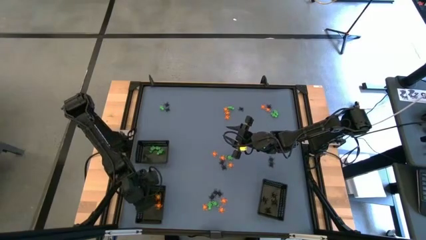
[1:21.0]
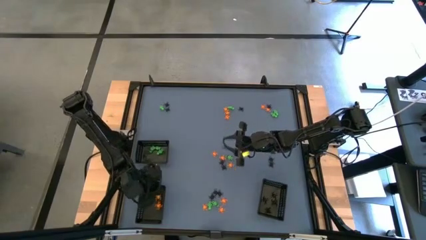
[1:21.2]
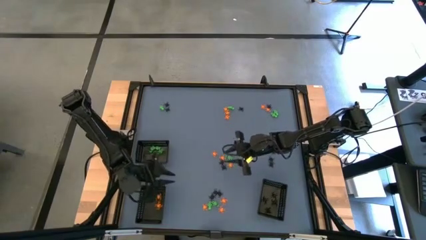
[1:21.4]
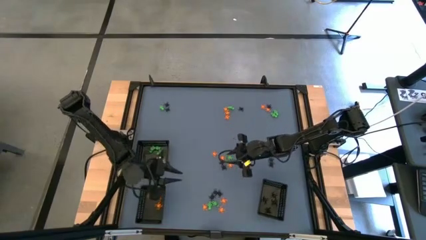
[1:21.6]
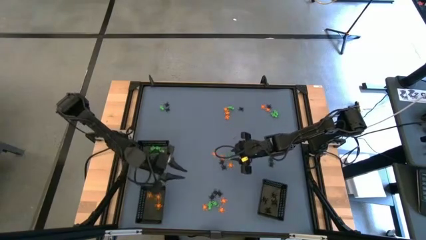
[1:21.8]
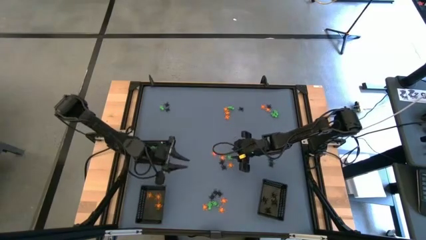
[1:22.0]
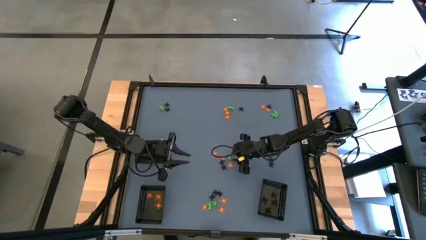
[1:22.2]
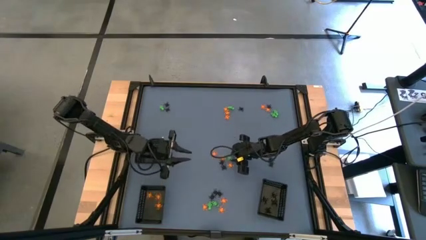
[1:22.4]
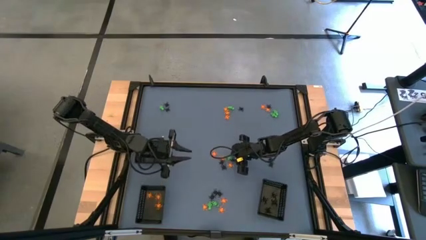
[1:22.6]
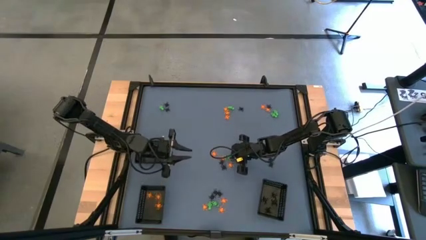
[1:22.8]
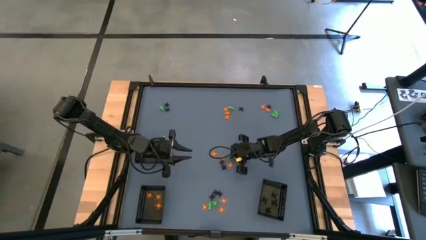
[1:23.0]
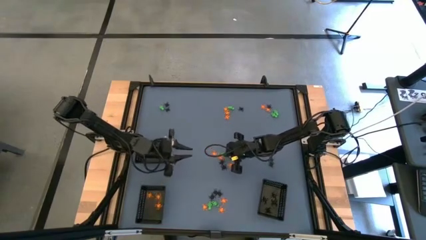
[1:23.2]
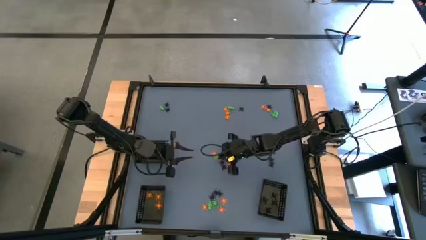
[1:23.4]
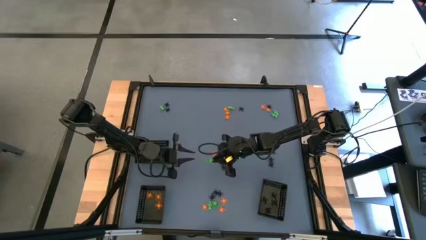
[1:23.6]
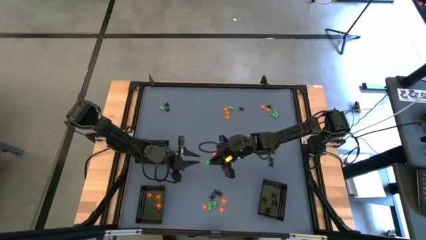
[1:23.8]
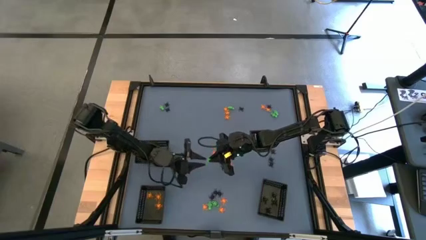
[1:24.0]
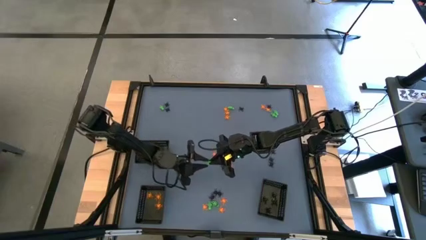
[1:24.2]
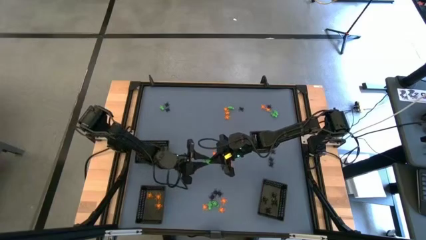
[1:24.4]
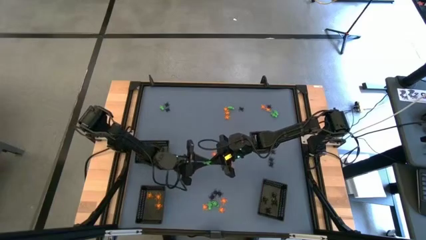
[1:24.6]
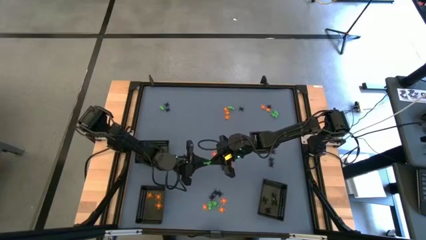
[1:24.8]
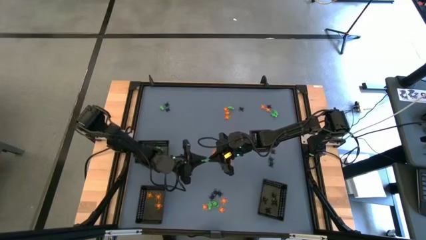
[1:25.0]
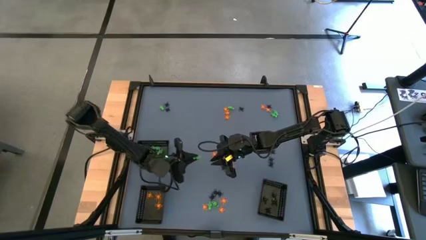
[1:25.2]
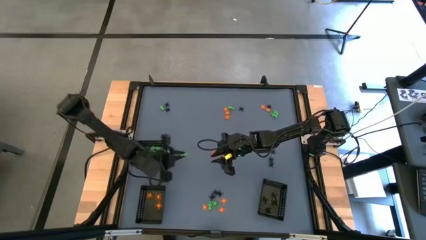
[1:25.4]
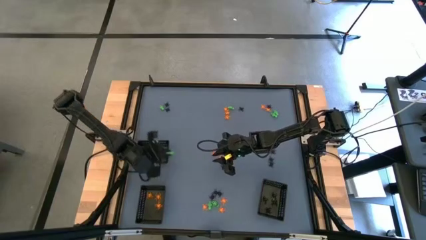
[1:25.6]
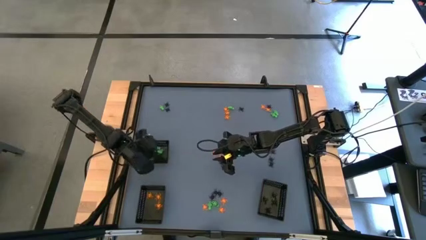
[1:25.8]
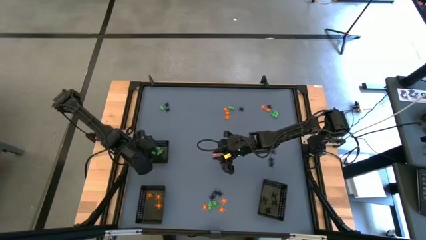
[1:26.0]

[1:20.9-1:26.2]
Task: Sort Halloween decoration
Put the green skeleton toy into the top black bin

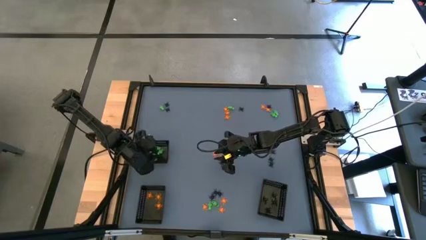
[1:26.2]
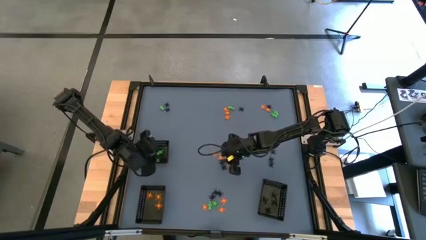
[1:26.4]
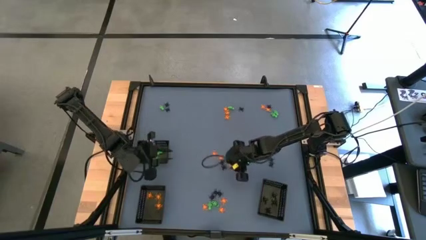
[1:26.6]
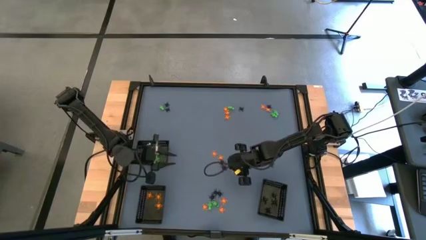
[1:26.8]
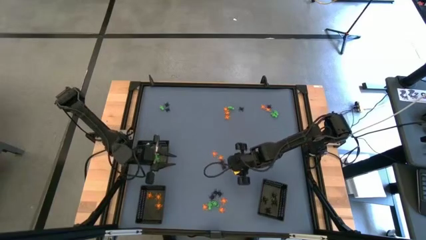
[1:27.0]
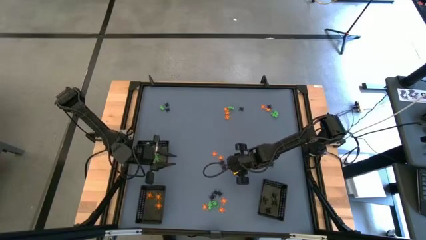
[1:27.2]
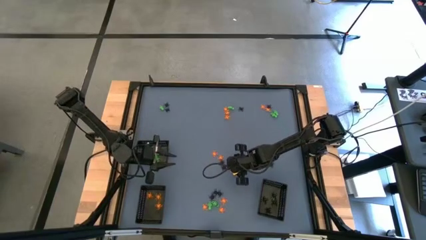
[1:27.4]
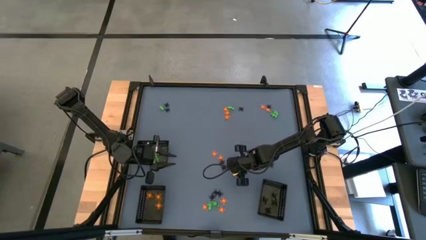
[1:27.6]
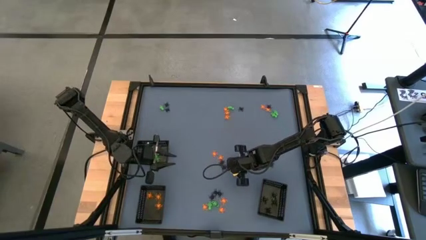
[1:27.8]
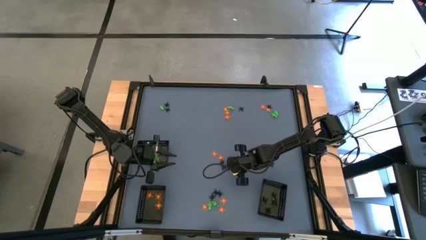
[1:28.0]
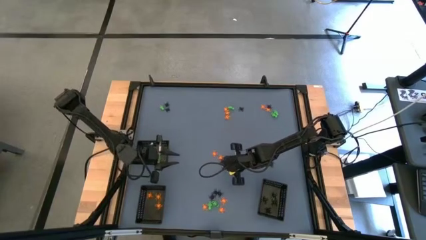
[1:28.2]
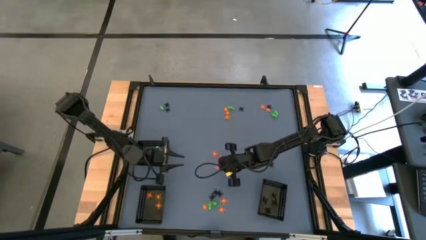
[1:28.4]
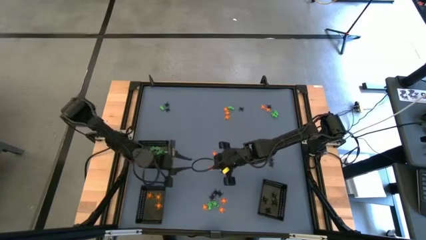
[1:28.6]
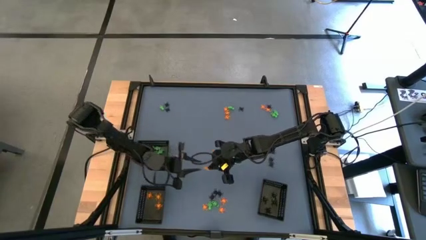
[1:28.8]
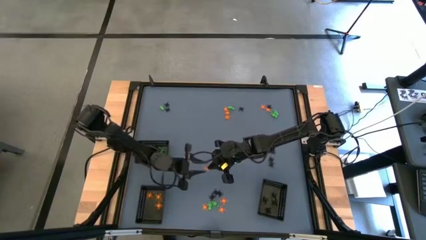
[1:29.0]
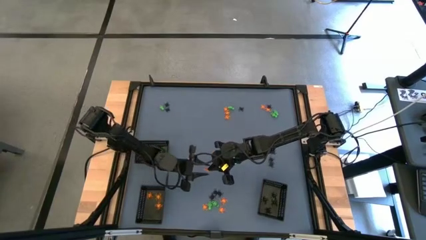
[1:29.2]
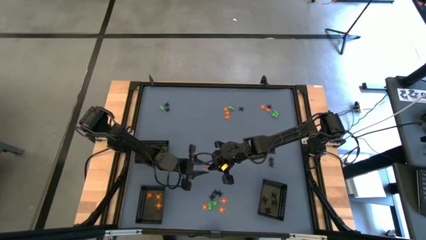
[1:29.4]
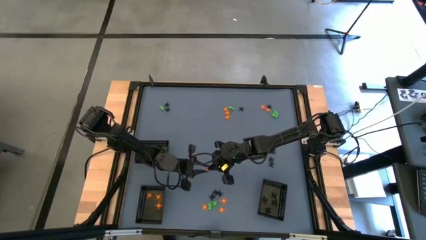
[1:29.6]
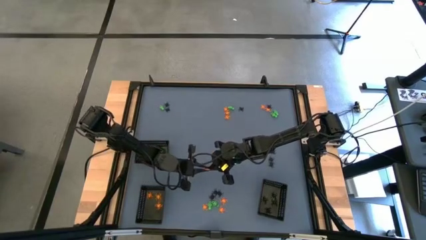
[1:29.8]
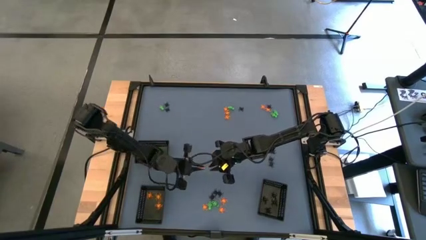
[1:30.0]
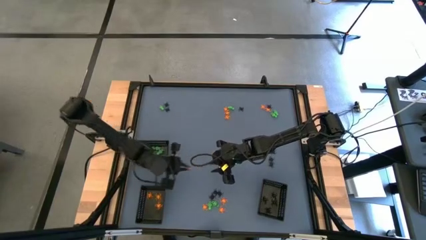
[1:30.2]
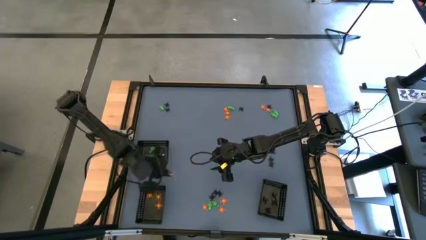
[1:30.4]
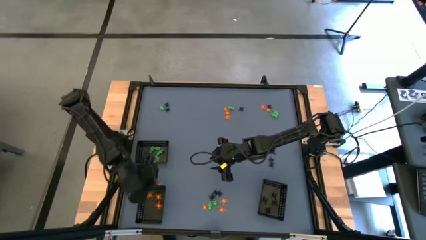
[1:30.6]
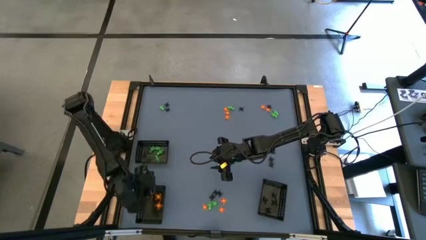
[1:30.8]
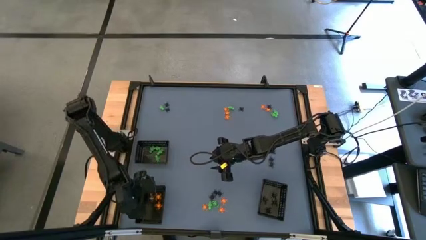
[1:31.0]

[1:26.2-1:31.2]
Put the orange spider toy into the bottom left black bin

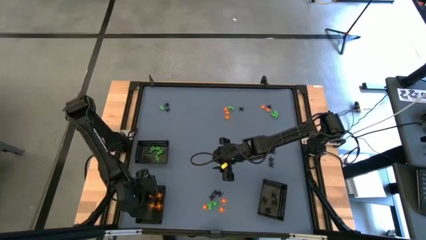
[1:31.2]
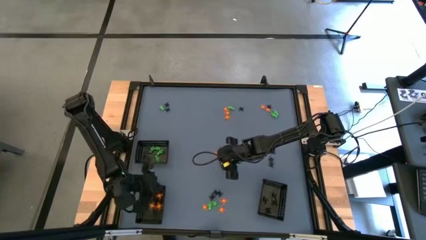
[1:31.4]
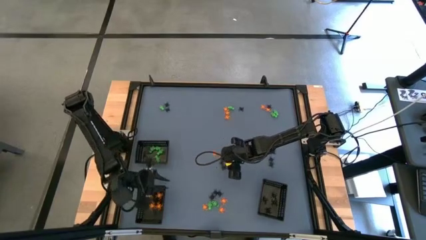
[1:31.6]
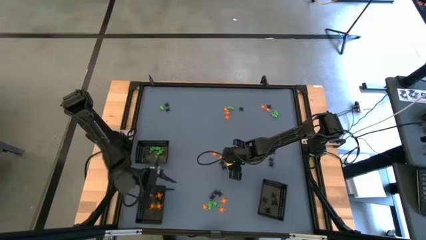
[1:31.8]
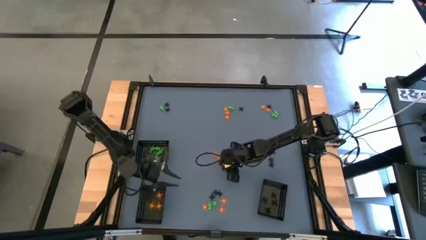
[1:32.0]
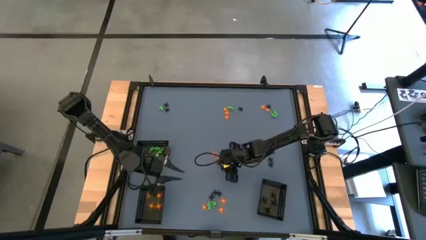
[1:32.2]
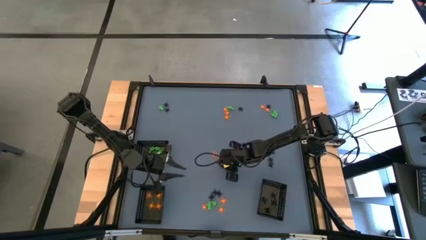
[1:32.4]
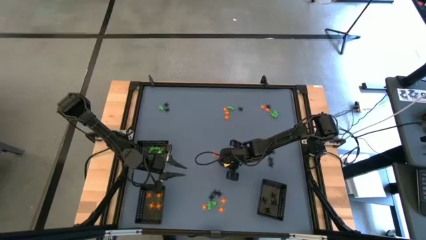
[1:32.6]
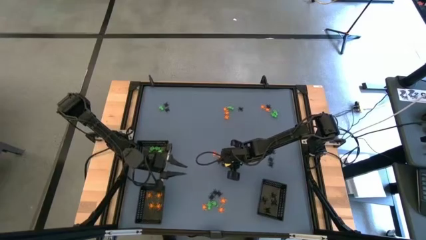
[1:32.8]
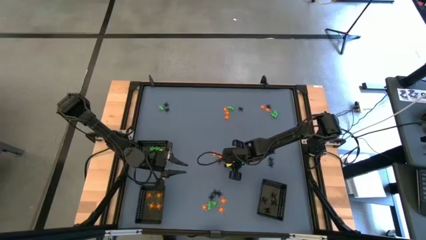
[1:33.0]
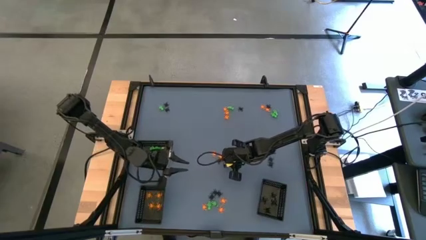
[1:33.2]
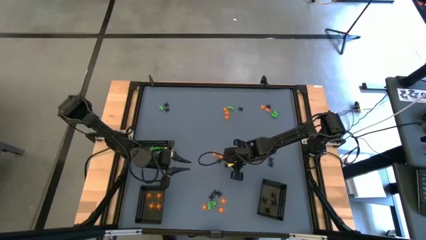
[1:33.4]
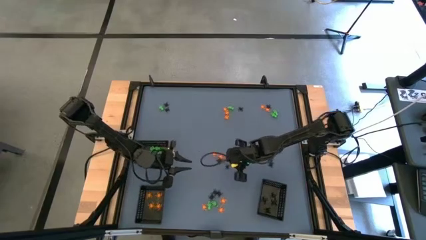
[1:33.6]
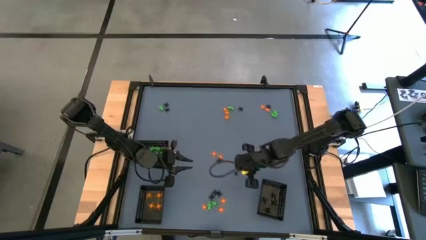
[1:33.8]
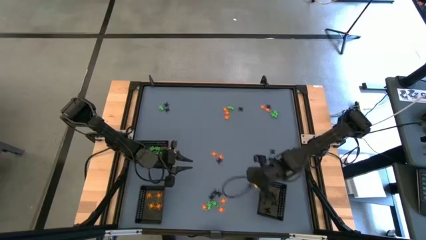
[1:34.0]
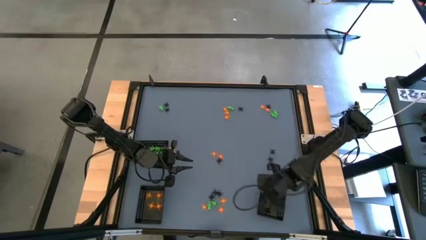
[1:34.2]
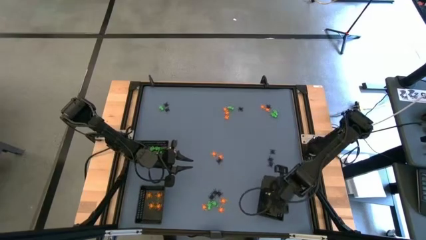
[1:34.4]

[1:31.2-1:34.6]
Put the black spider toy into the bottom right black bin

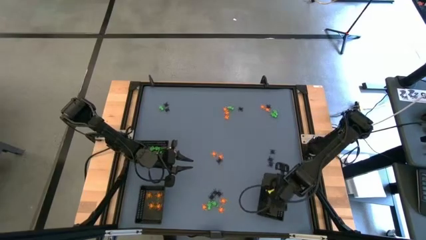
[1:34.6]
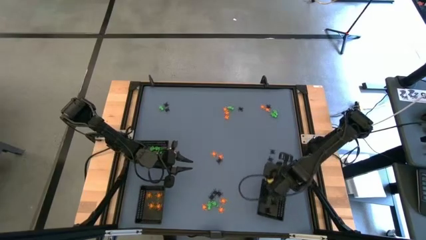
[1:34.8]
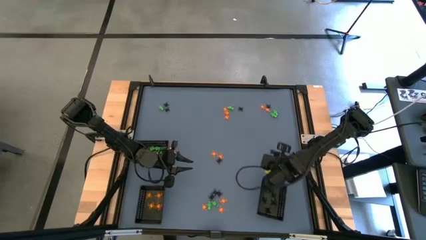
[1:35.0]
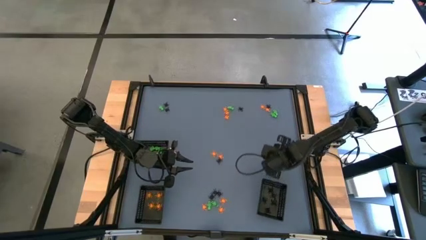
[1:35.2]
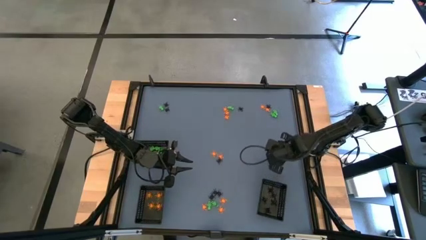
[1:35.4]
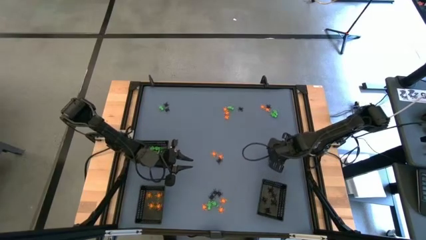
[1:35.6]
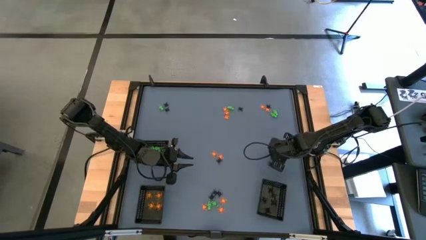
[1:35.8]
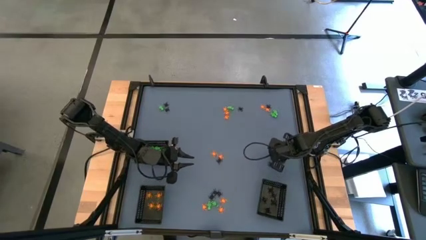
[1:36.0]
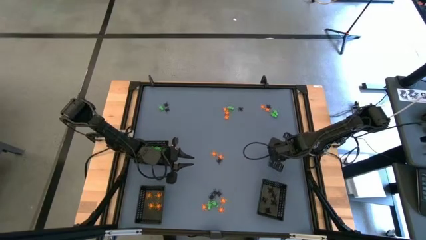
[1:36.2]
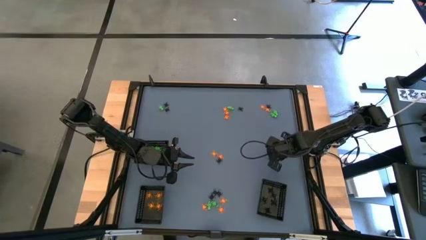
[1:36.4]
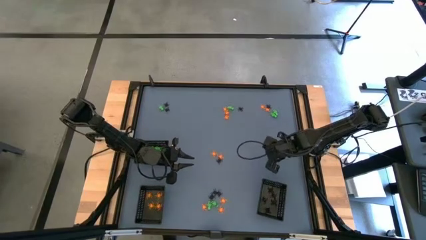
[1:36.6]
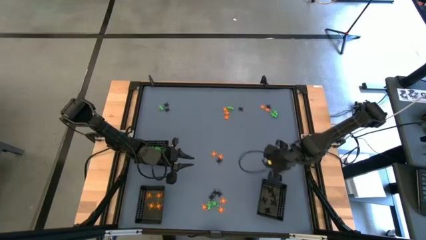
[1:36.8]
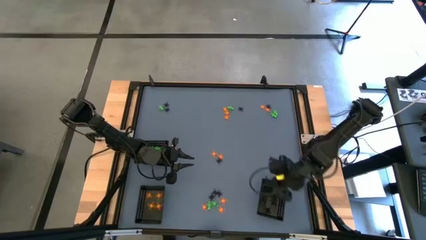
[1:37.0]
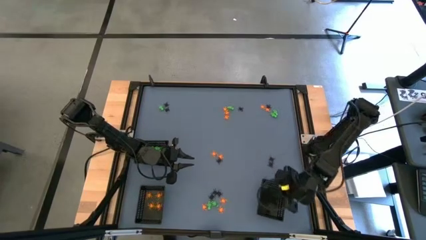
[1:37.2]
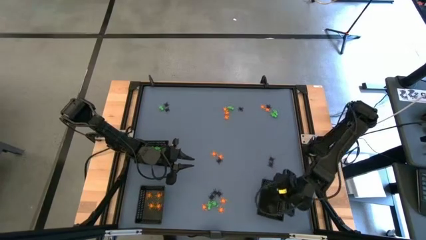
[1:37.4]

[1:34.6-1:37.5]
Put the black spider toy into the bottom right black bin

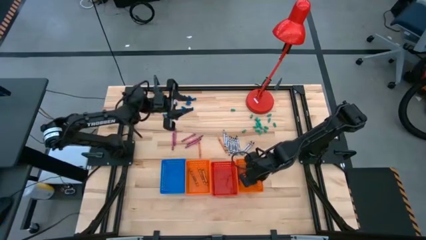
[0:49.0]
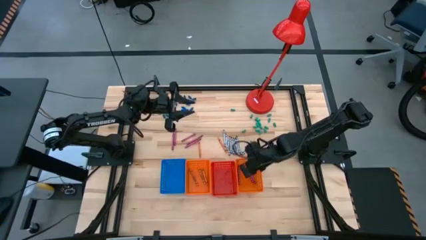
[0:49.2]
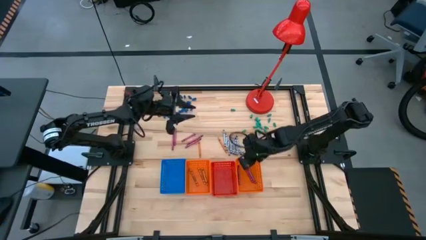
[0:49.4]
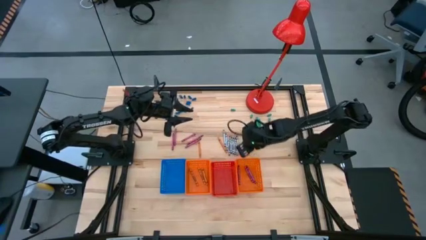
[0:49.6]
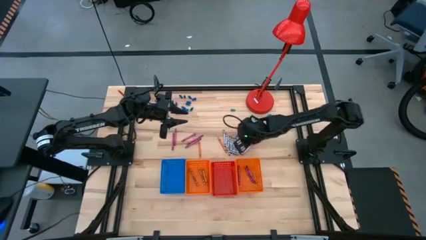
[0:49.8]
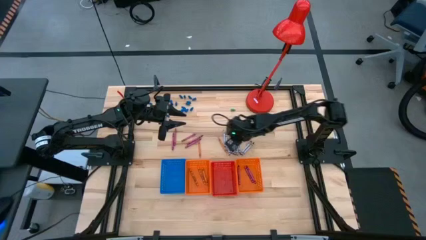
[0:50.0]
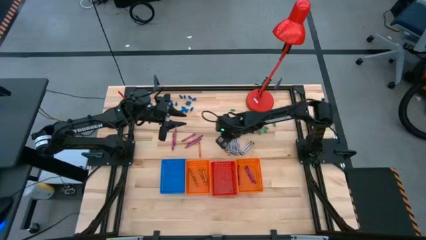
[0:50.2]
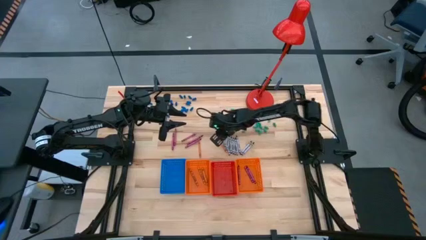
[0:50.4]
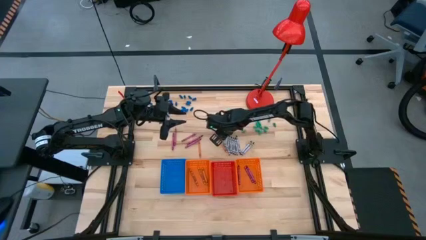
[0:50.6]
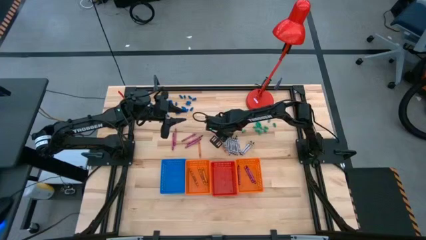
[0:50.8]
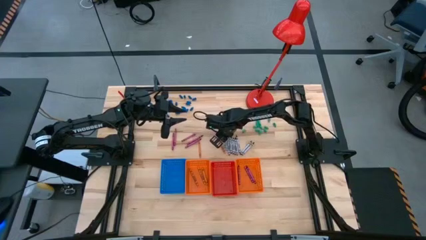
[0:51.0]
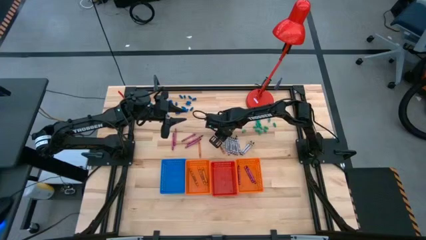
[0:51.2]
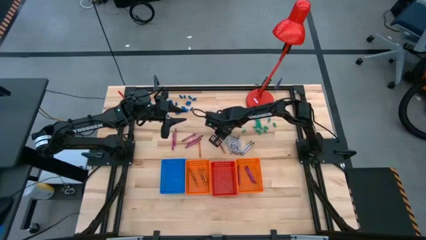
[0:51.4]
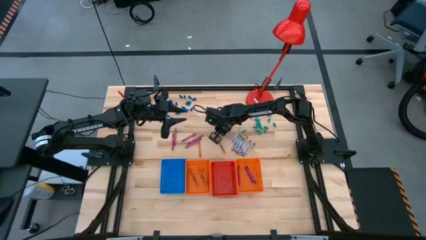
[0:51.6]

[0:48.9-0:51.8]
Task: Sort crayons
Put the gray crayon into the red bin
